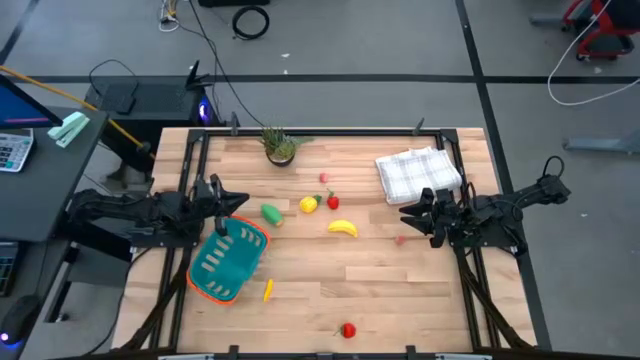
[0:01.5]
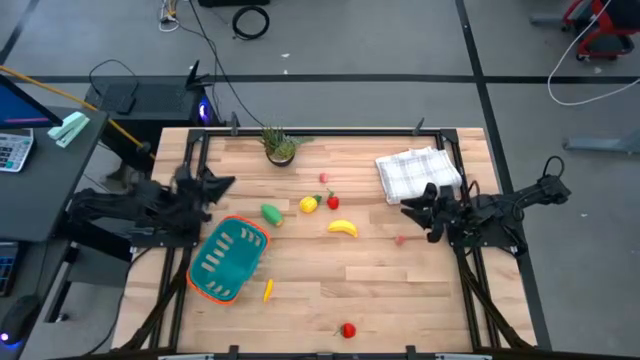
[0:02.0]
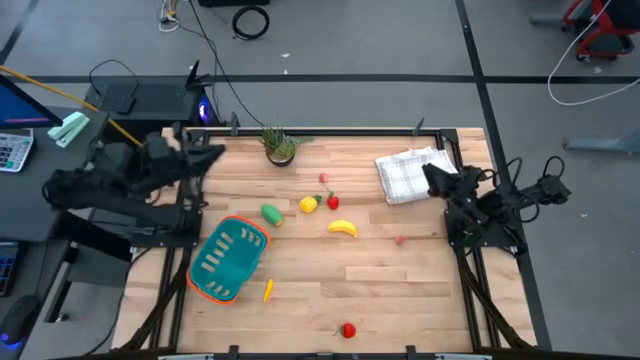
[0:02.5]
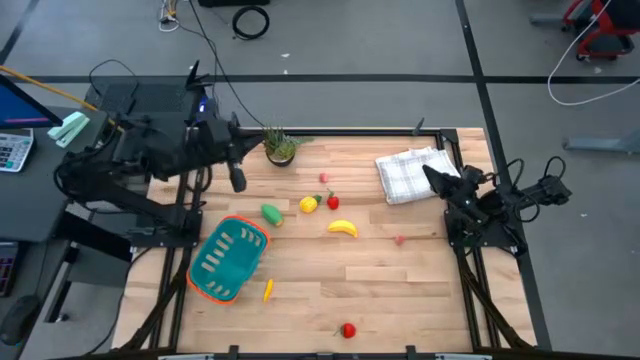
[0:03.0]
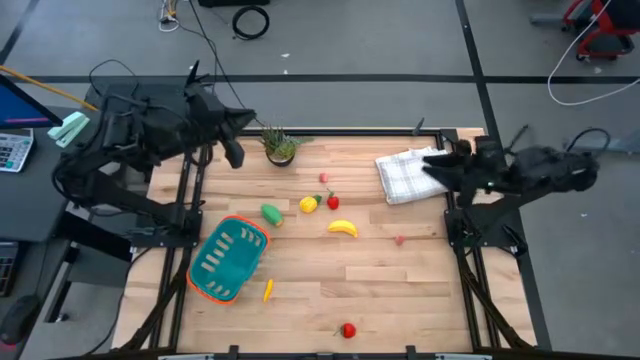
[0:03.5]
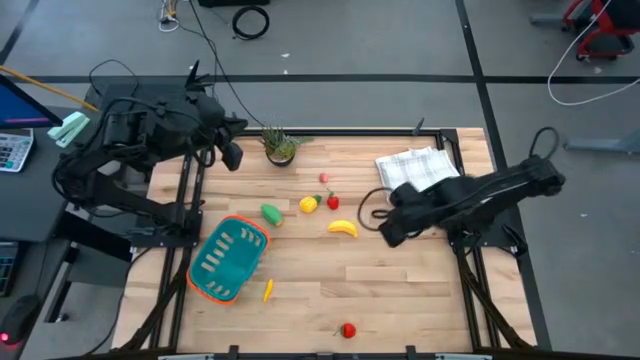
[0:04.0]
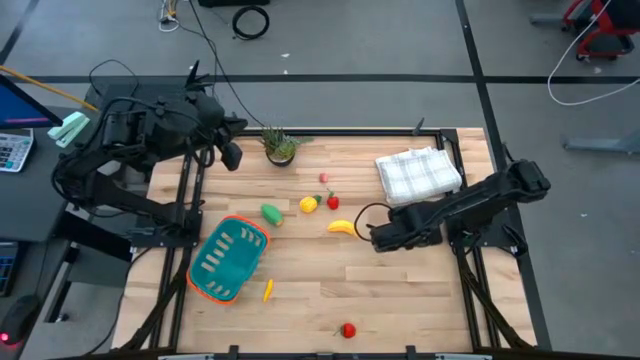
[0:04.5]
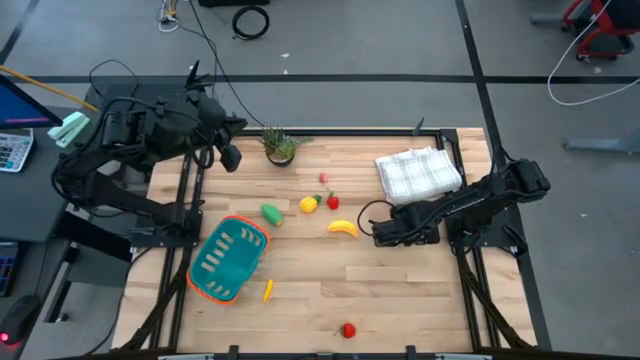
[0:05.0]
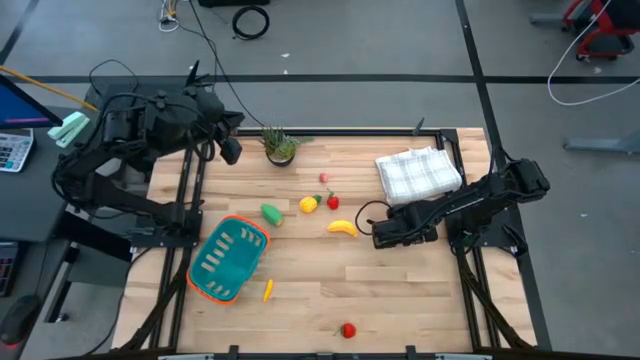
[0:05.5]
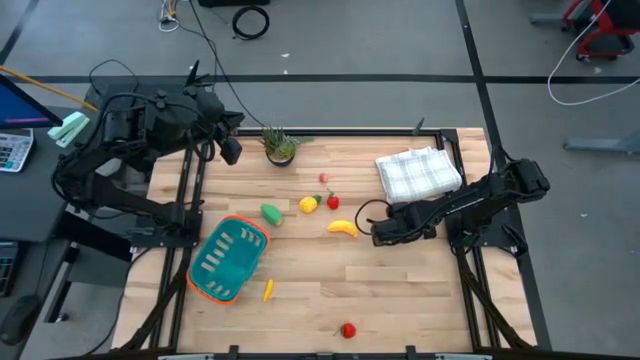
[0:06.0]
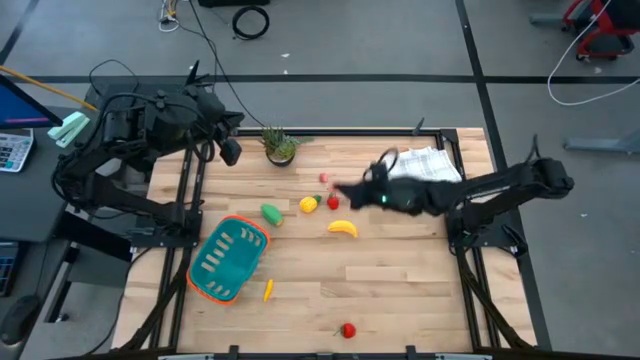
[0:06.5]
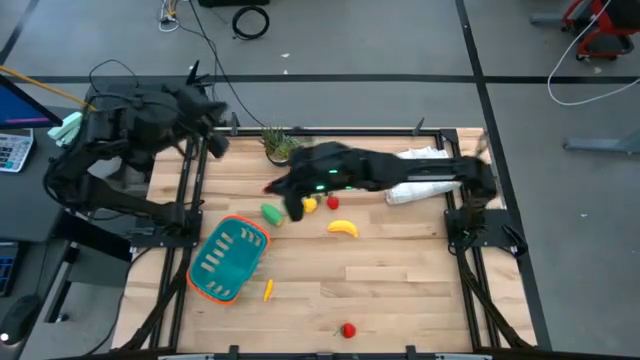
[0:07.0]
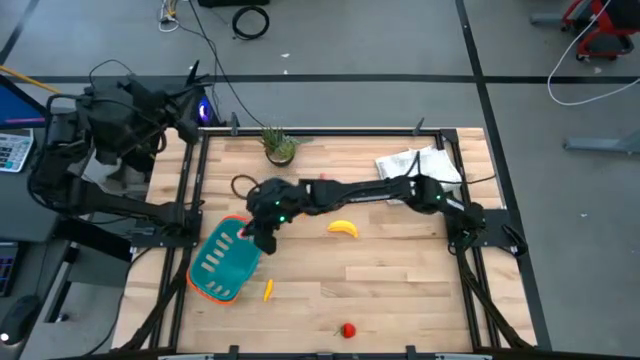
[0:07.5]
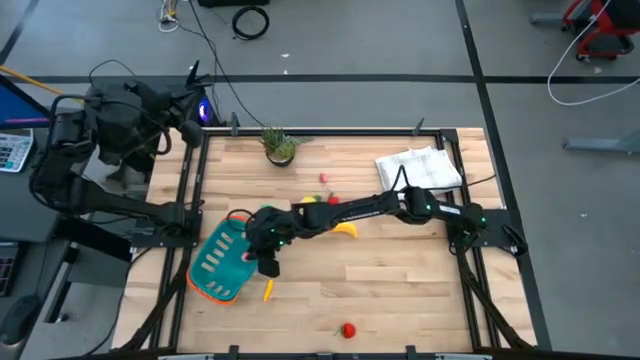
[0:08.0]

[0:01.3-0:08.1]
Task: Pick and placing Produce into tupperware
Put the bottom pink peach into the blue basket

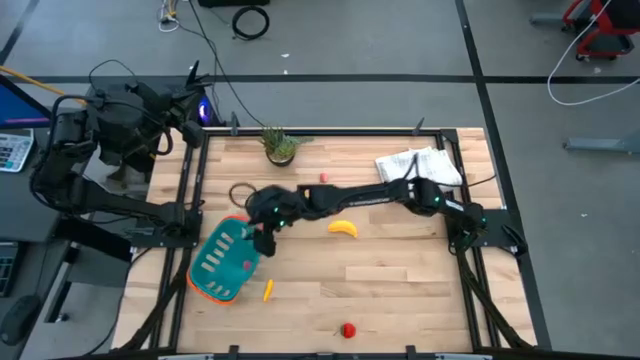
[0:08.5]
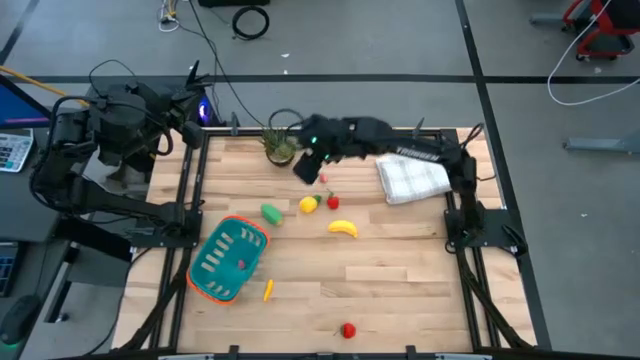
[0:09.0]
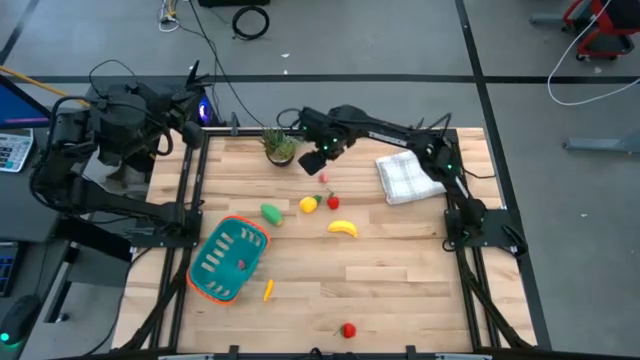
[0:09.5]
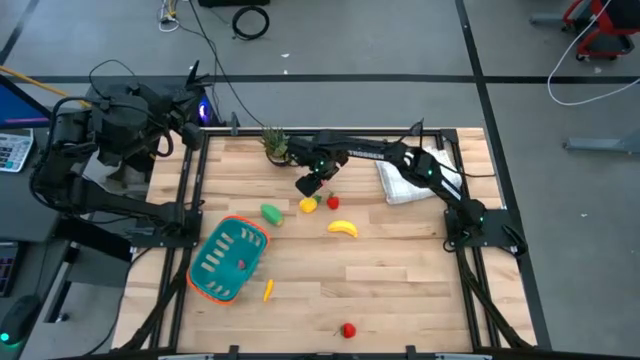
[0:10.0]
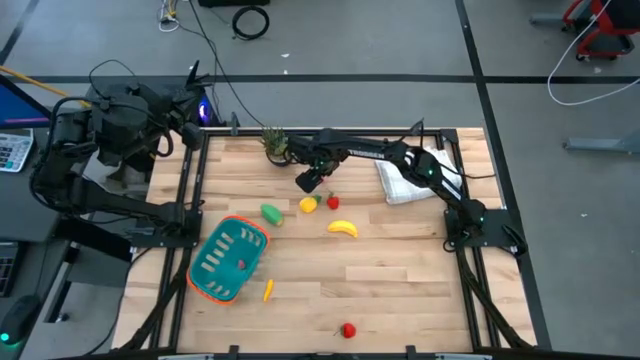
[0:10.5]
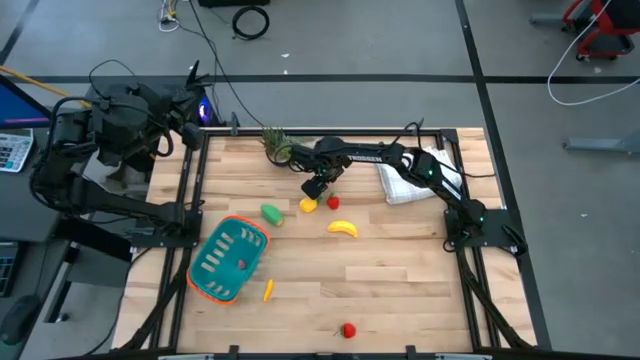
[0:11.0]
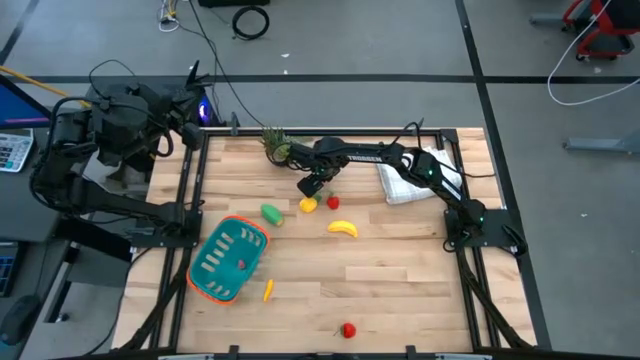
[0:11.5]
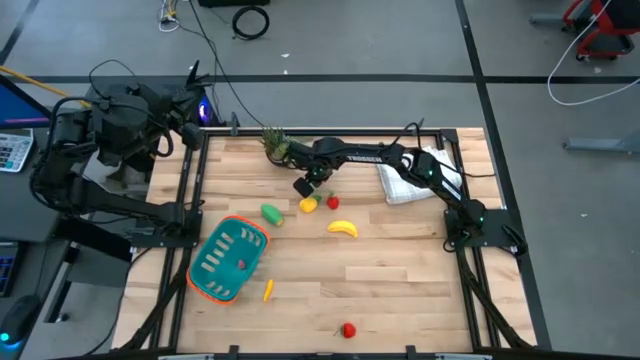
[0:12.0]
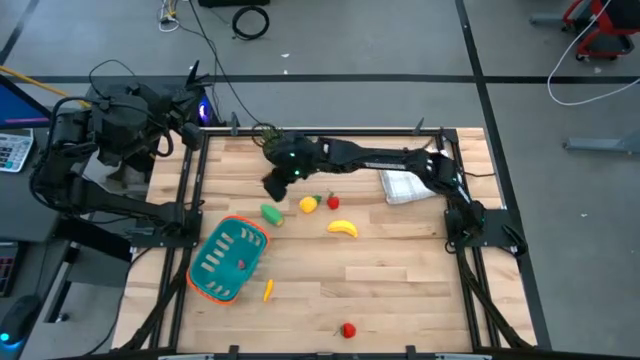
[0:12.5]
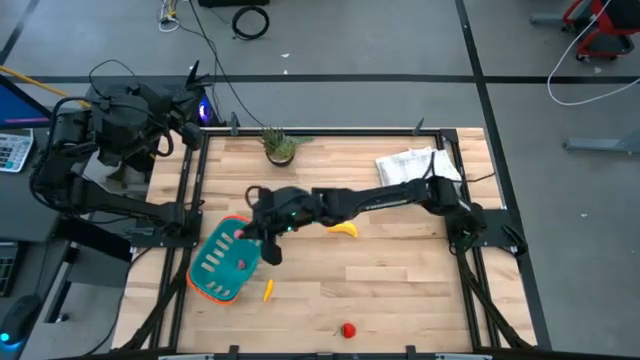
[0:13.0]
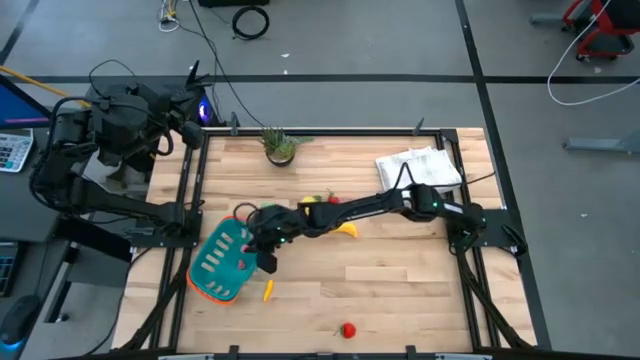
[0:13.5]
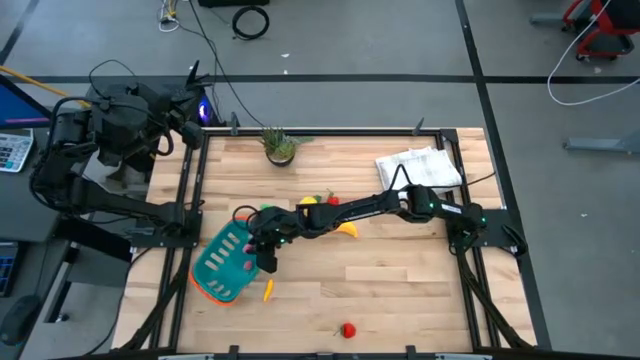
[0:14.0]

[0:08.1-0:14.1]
Put the pink peach into the blue basket

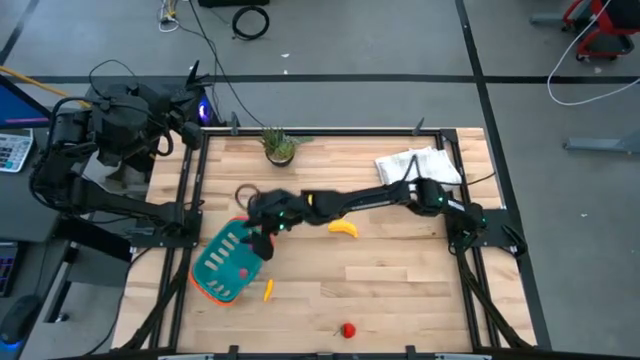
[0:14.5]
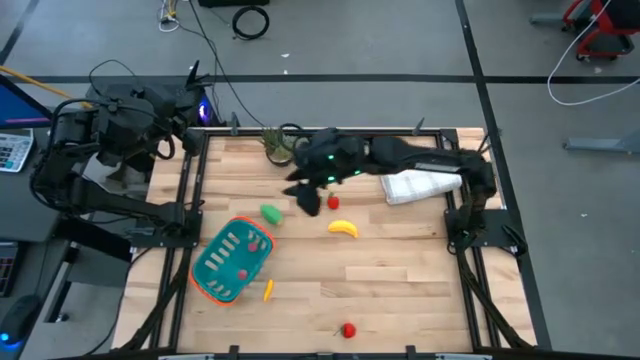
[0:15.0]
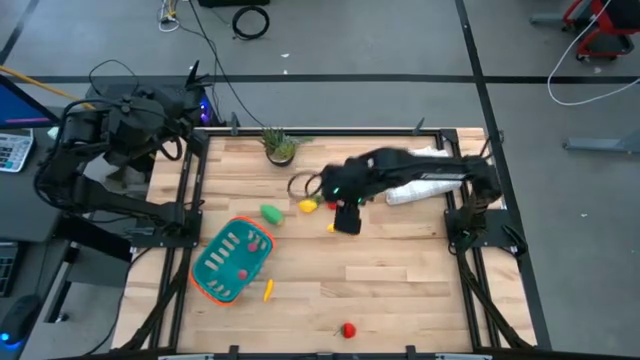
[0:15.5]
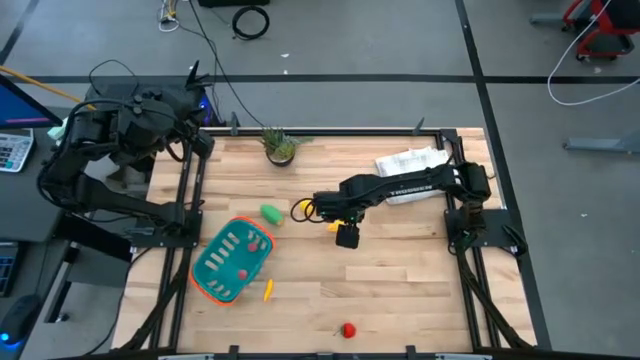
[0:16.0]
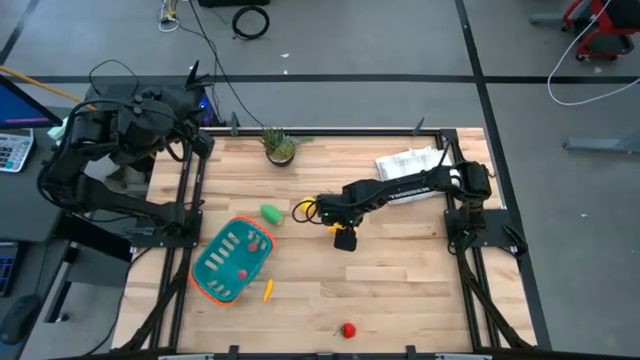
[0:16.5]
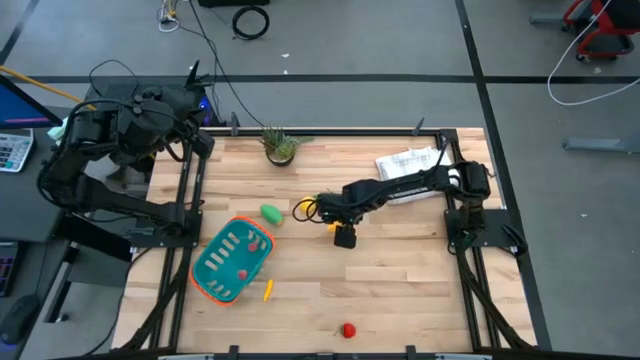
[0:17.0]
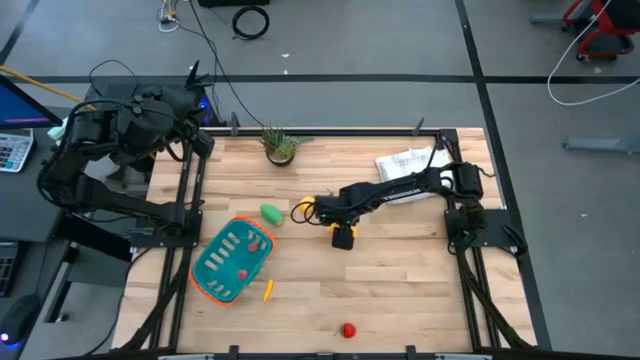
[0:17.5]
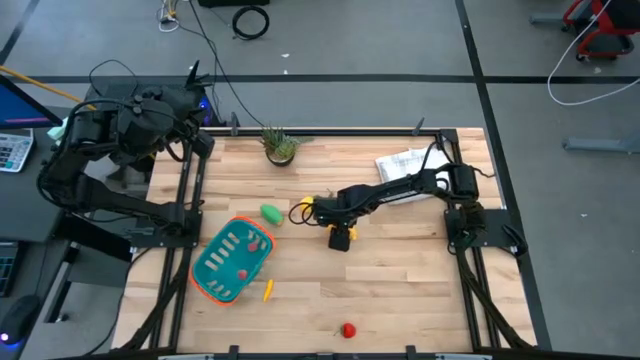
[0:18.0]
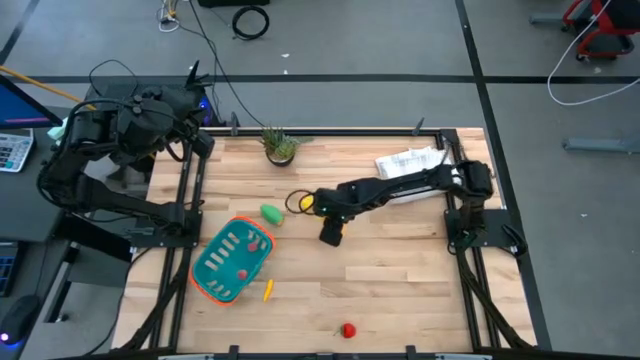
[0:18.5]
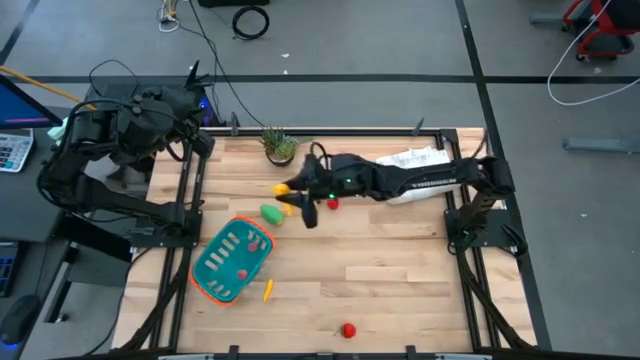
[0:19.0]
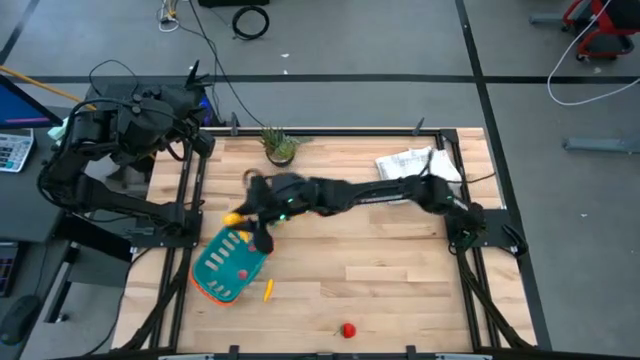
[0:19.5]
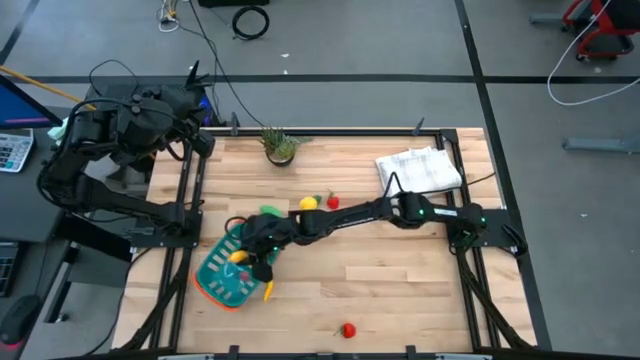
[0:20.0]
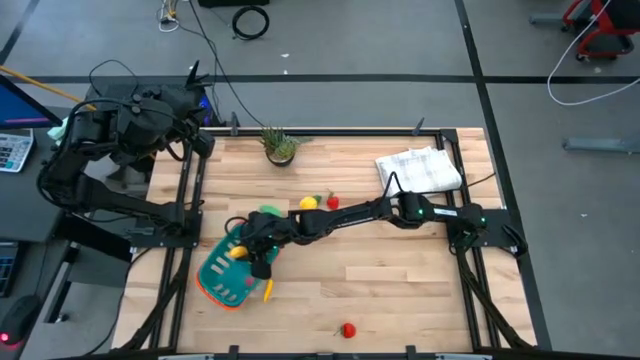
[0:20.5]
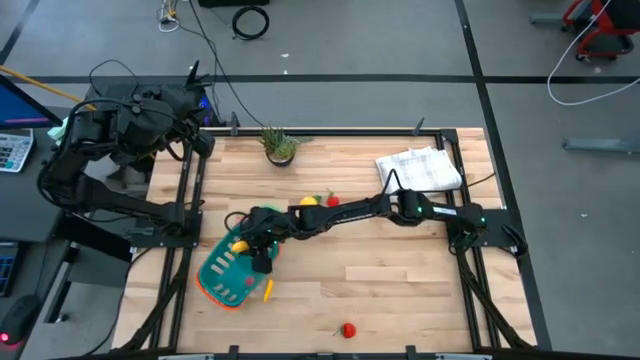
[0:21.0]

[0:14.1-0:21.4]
Put the yellow banana into the blue basket

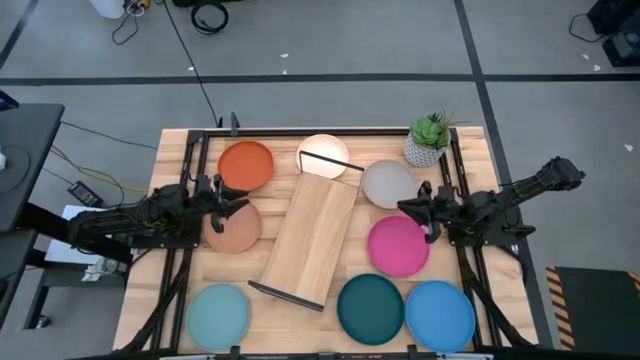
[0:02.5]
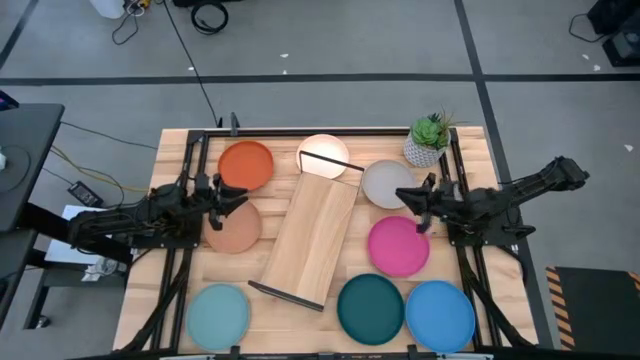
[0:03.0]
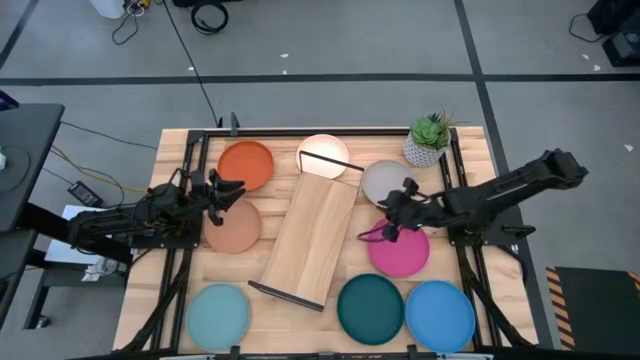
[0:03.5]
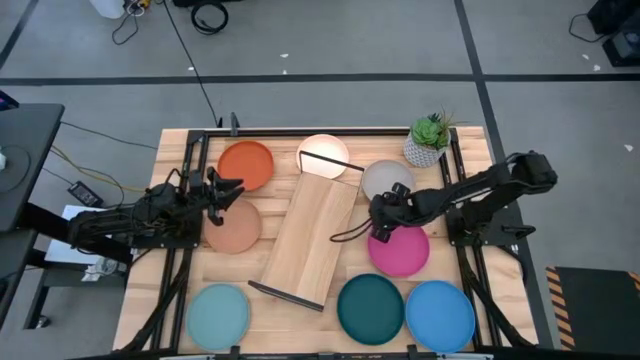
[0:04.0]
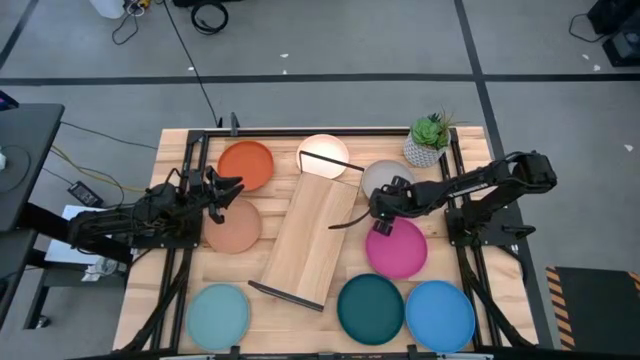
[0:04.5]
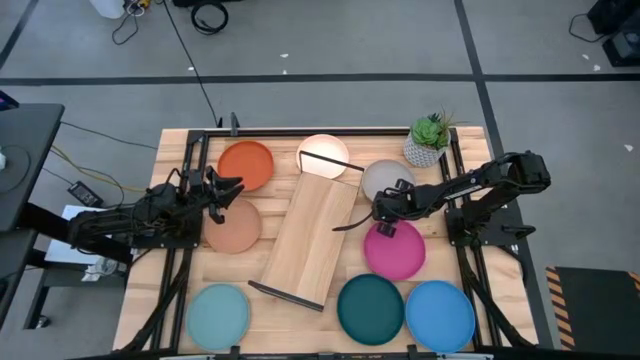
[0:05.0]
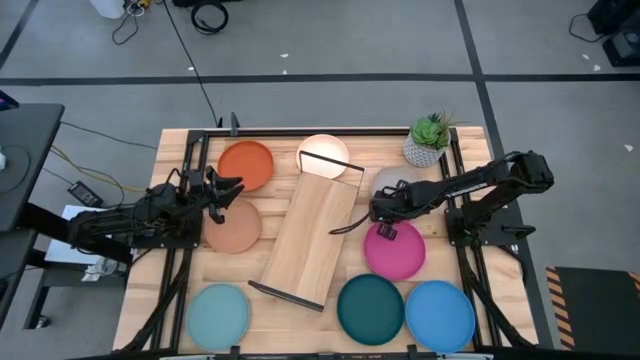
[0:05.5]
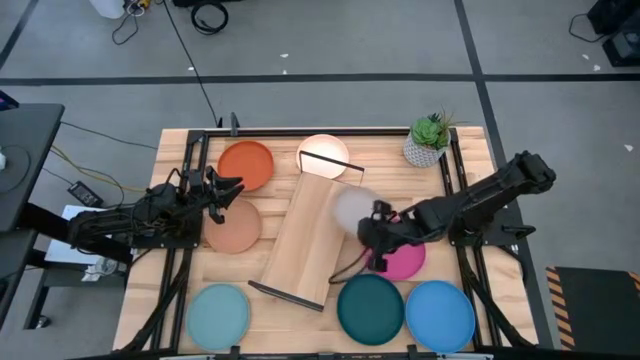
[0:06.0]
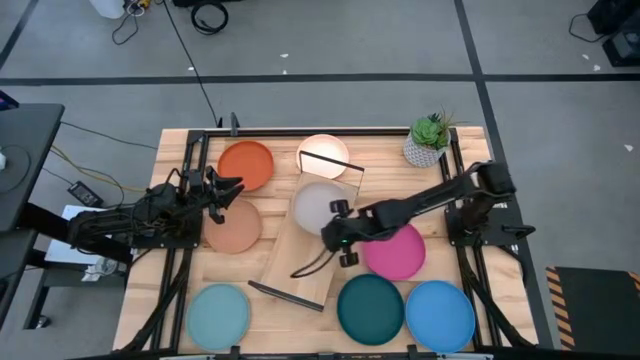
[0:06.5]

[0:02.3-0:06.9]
Task: Place and stack plates onto a shelf
Put the gray plate on the shelf
